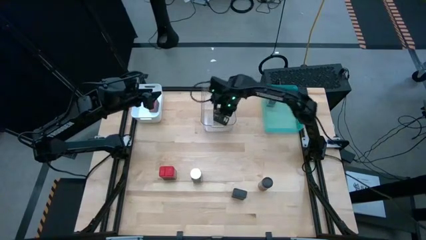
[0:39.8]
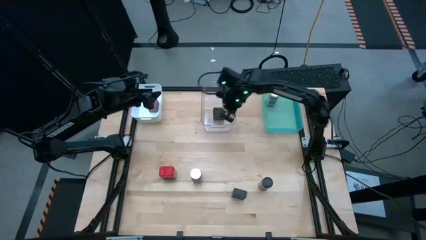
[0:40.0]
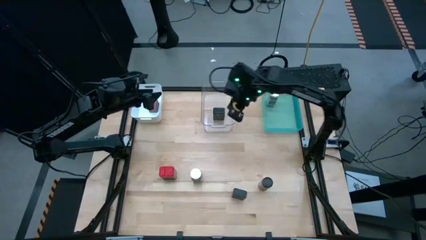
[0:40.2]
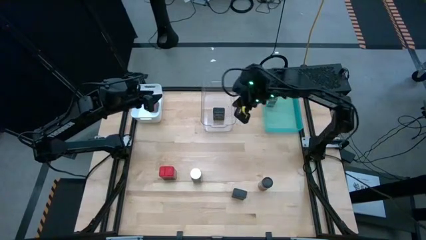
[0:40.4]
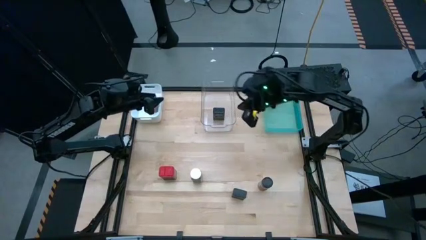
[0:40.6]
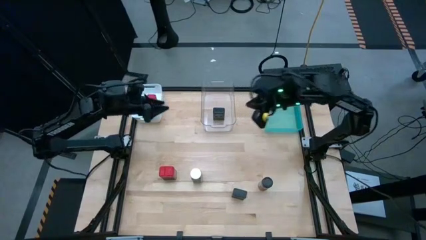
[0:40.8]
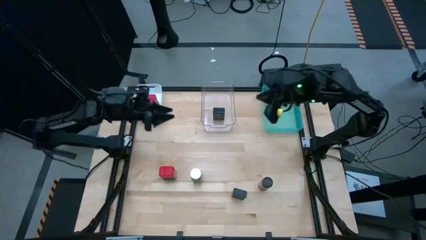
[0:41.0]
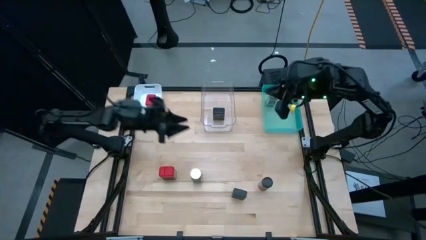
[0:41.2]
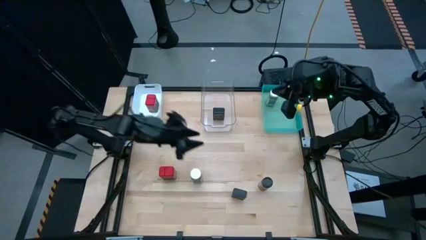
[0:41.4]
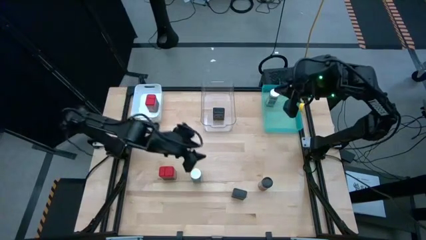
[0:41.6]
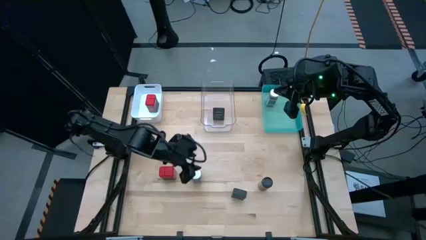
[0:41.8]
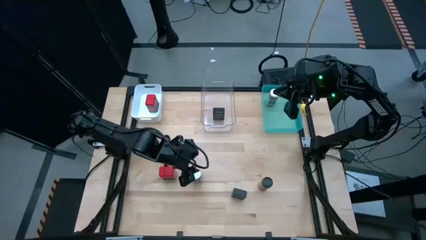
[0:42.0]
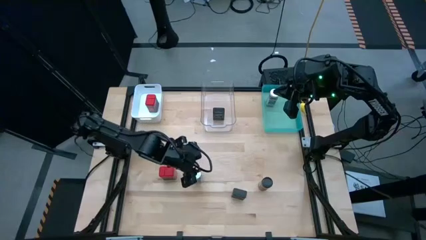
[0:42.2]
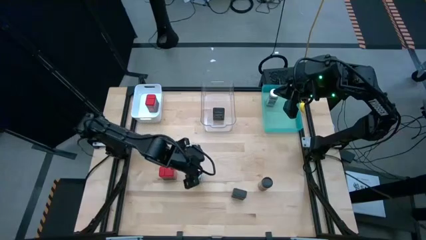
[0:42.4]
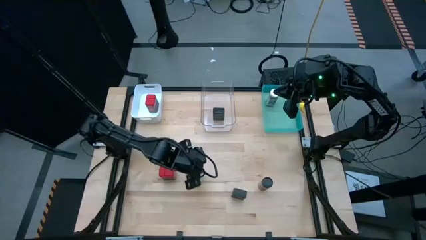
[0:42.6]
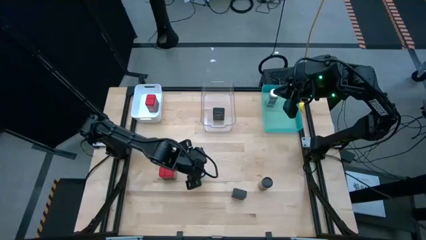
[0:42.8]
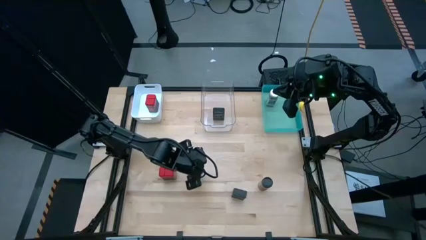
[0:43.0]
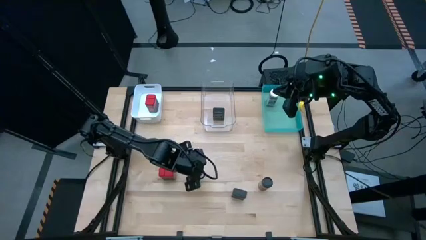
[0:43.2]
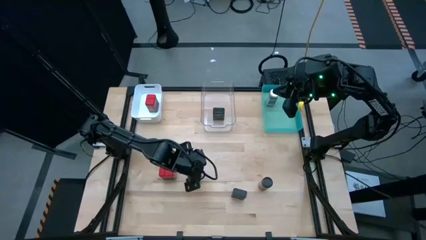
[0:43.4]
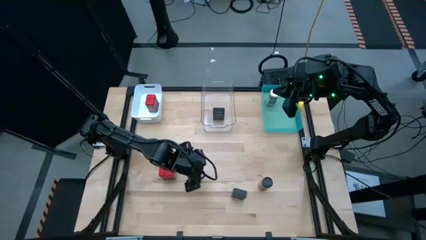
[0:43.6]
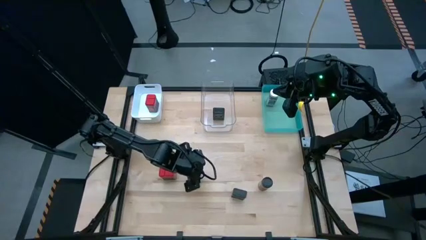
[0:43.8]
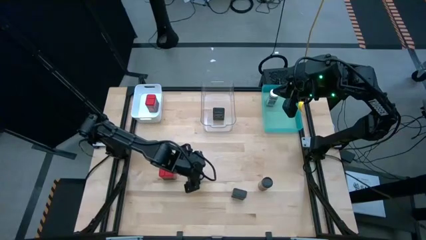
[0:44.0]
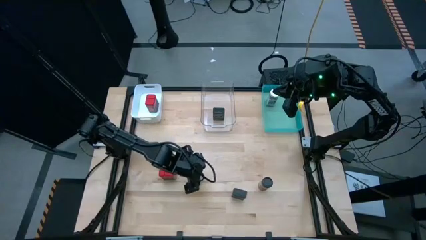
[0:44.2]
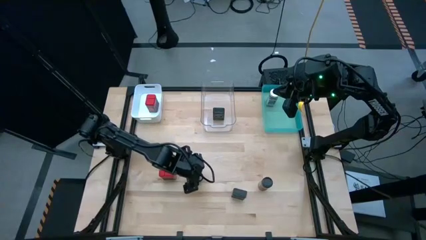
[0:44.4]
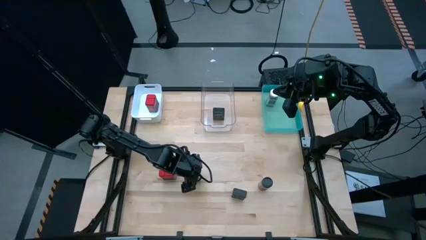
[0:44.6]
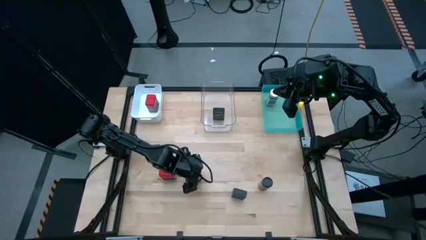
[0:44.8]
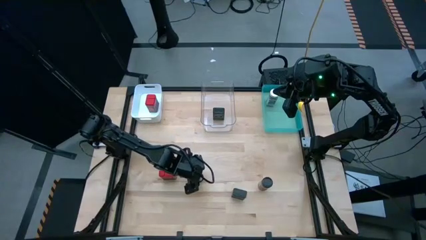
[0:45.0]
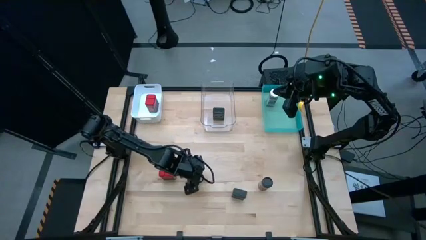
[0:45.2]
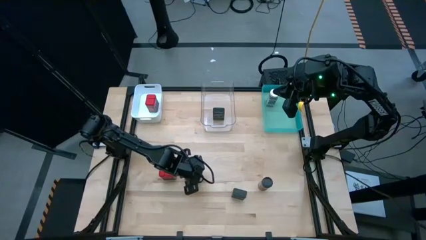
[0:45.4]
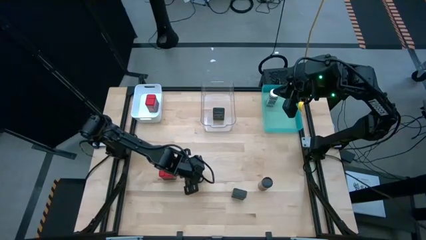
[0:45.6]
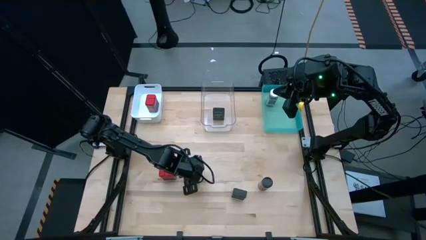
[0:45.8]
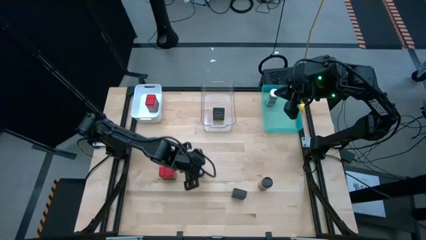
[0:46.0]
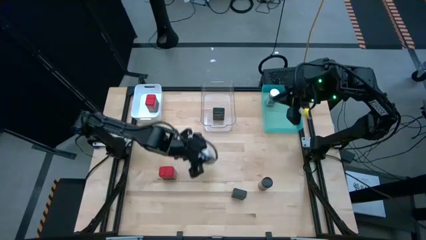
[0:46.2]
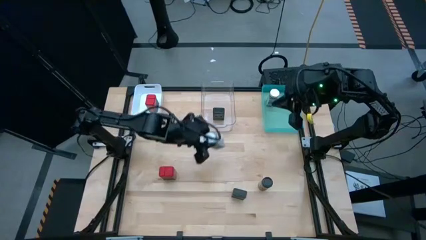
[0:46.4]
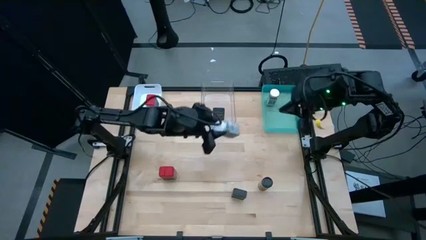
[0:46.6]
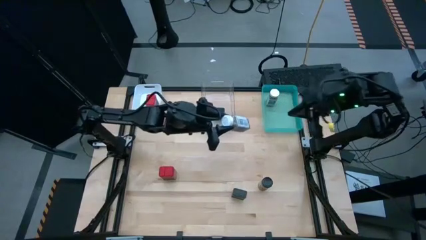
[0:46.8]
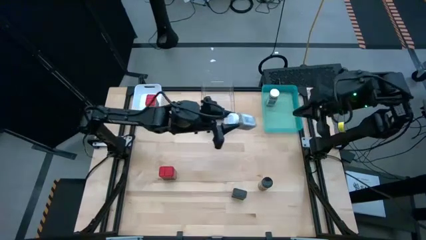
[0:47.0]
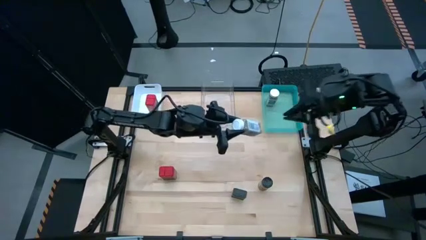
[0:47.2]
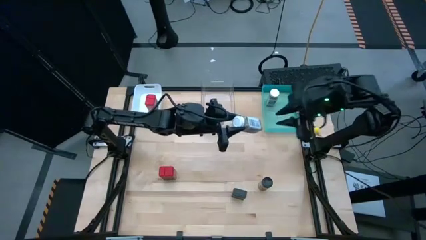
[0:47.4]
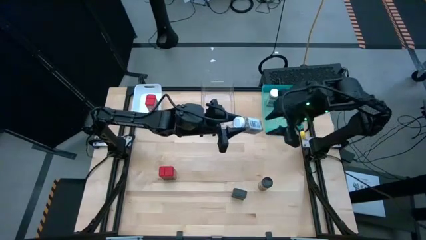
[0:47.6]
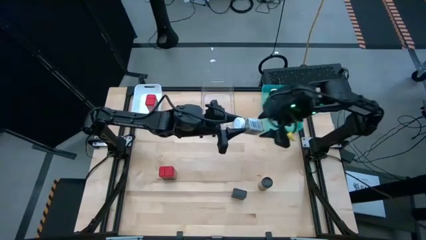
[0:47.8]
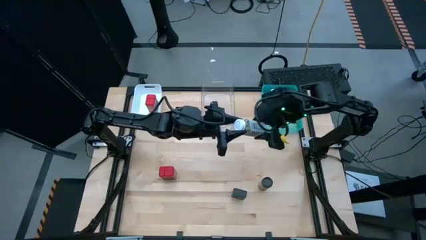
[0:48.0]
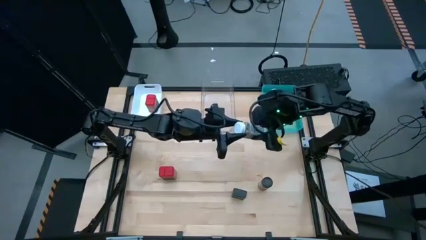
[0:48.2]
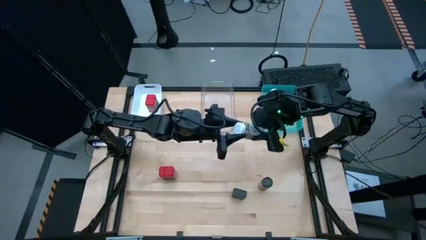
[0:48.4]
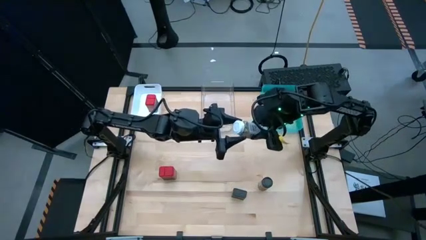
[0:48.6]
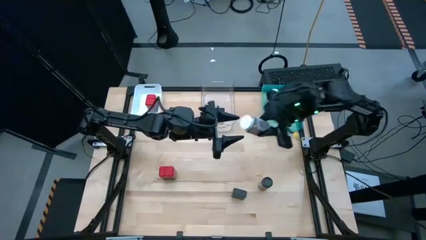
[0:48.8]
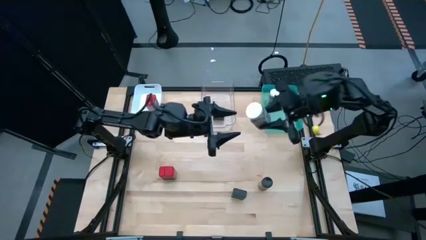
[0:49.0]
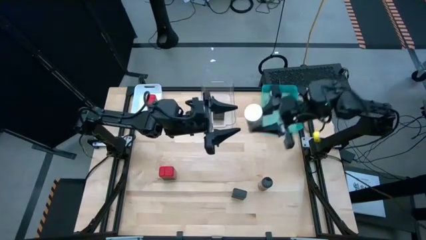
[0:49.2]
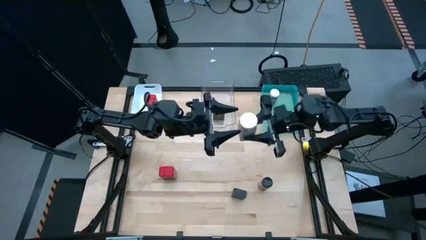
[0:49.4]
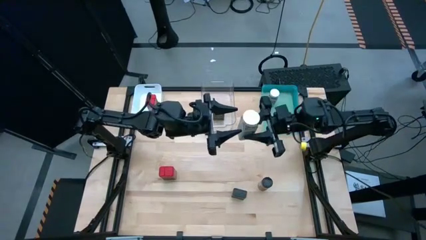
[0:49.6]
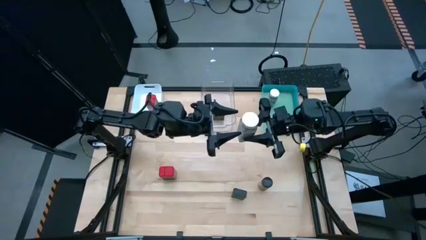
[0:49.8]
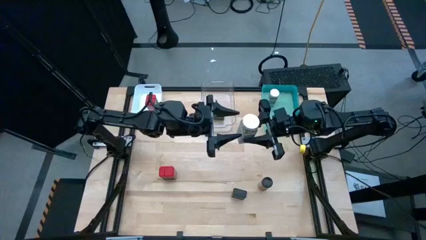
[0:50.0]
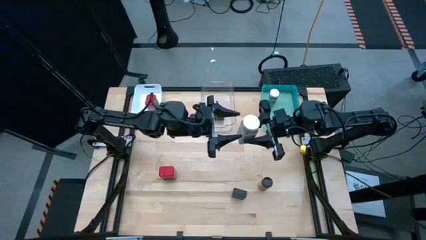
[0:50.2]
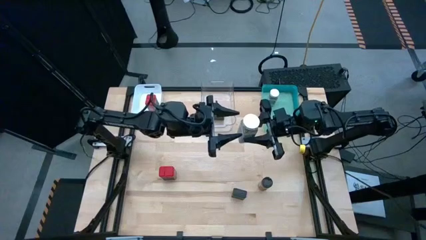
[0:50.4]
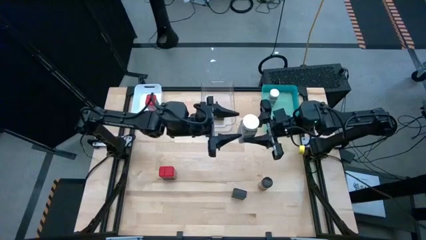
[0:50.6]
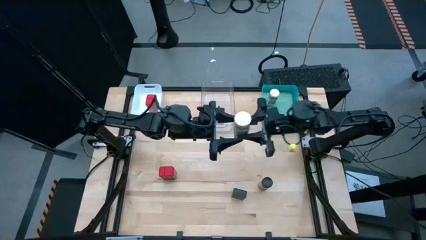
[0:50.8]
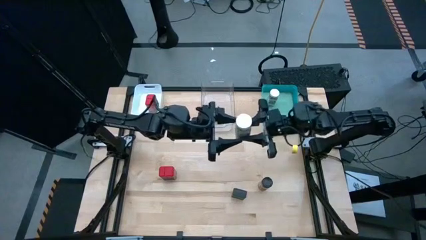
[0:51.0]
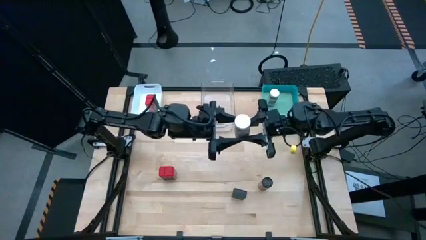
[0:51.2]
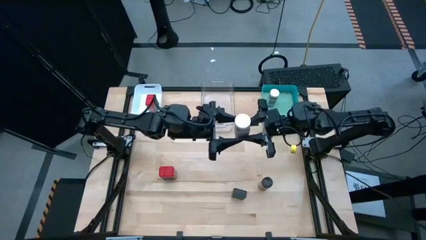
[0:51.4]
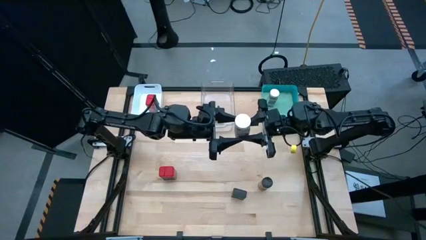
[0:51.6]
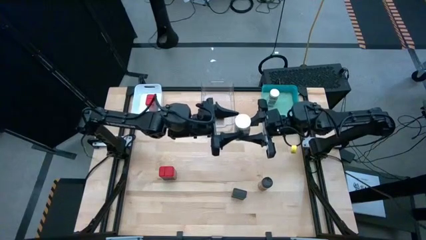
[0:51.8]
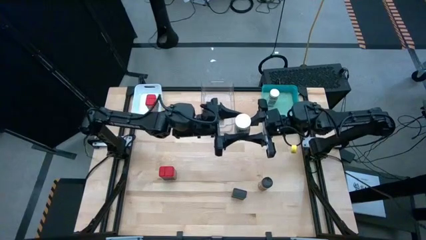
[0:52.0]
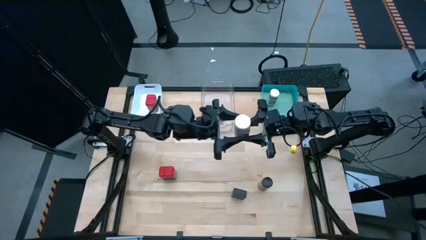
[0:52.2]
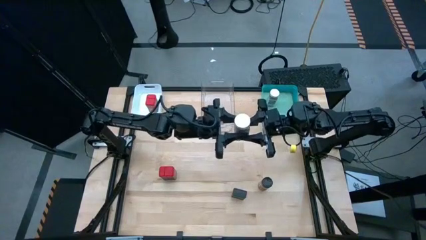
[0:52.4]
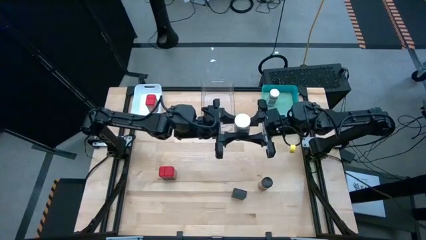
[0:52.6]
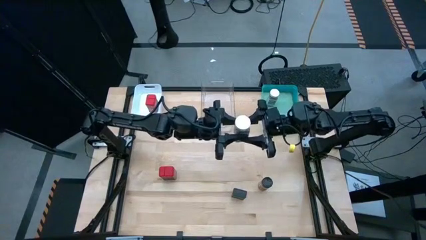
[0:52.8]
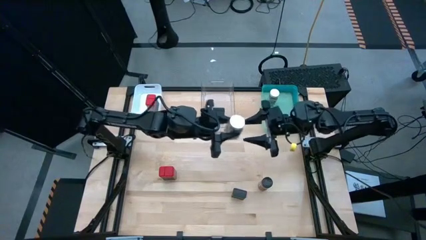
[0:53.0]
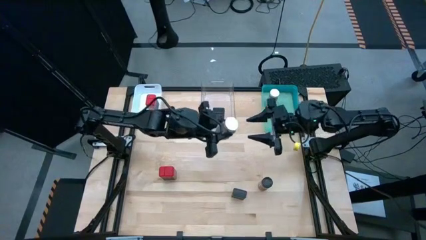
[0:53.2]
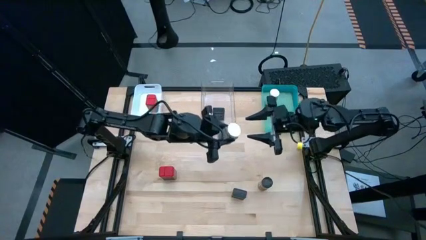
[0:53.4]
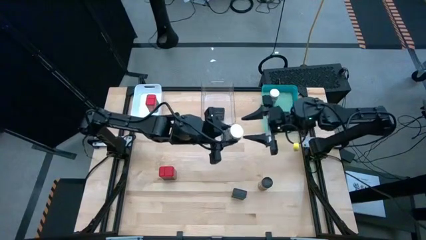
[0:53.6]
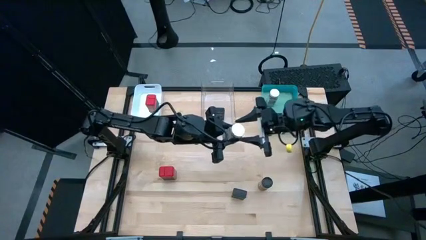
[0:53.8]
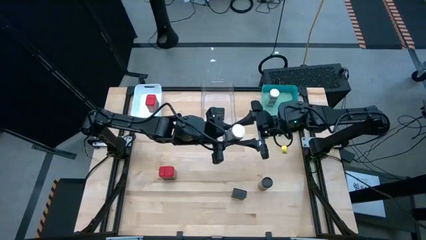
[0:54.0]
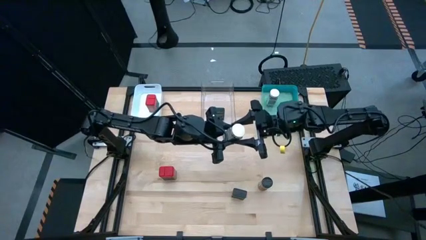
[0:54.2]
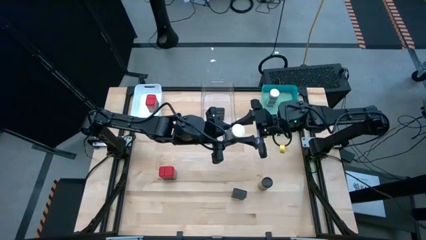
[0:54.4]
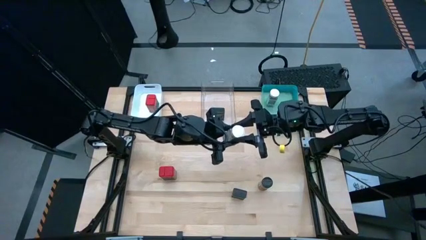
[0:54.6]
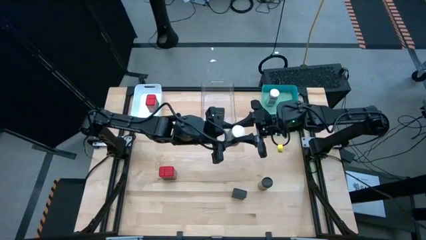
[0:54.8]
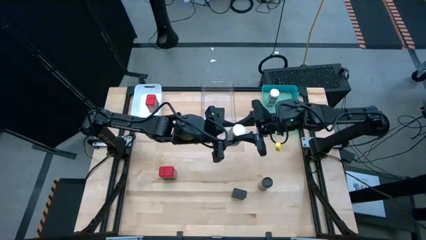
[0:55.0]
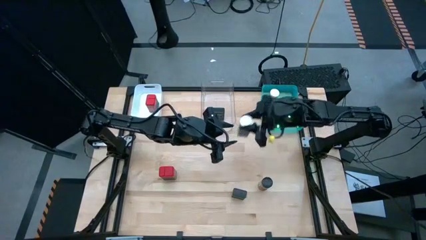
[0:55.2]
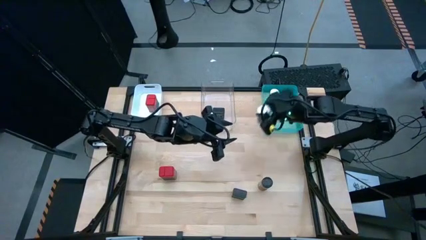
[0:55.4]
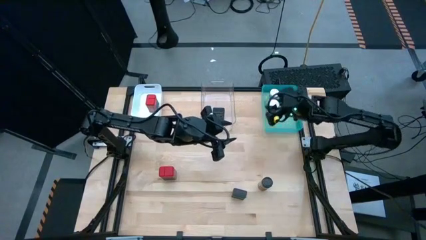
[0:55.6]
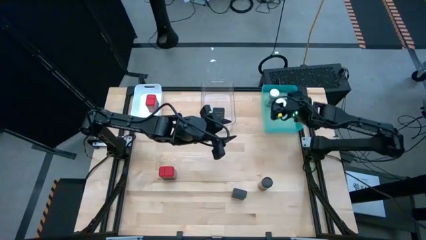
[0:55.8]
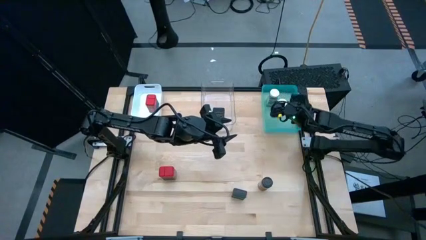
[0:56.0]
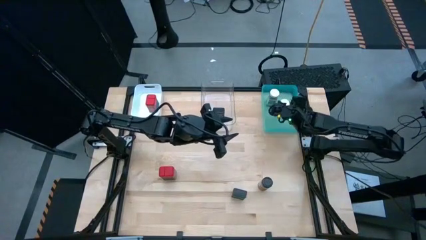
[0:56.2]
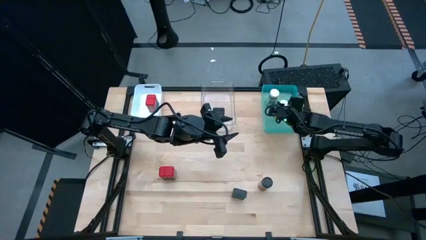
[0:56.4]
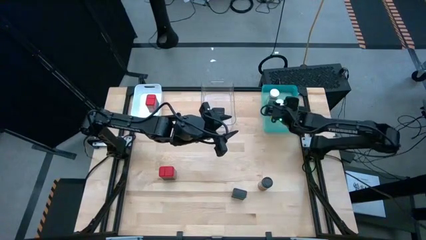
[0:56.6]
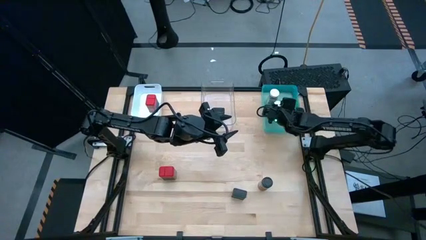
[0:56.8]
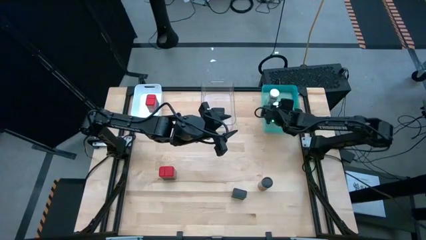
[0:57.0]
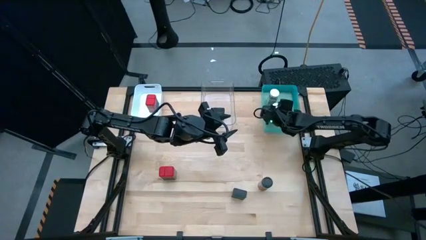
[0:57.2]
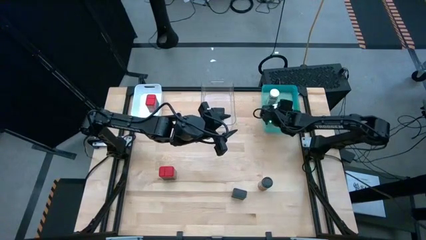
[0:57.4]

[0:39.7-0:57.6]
Task: Sort spices by type
Put the white seasoning bottle into the green bin
